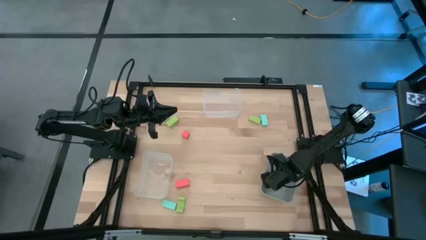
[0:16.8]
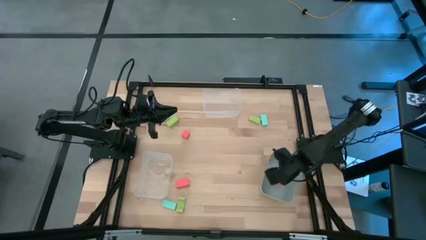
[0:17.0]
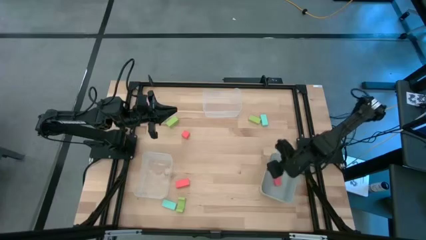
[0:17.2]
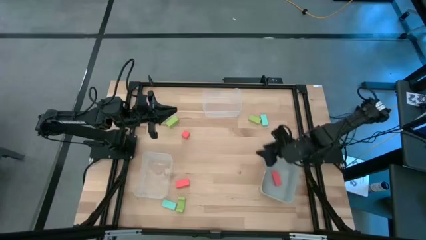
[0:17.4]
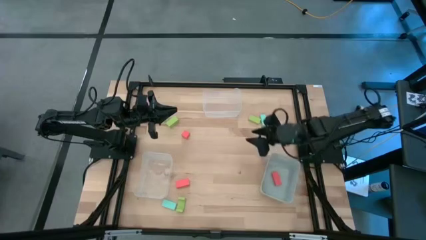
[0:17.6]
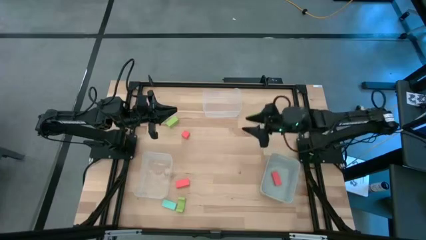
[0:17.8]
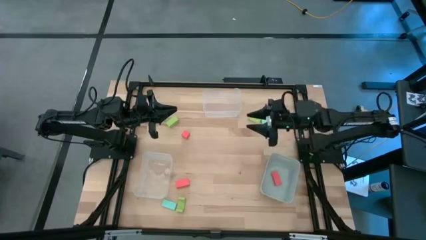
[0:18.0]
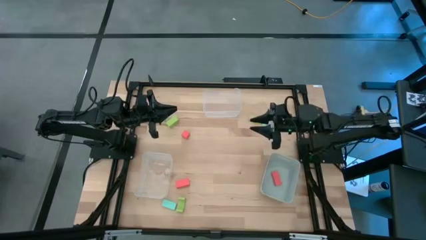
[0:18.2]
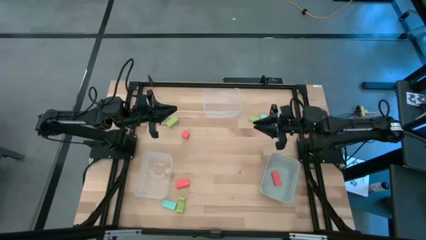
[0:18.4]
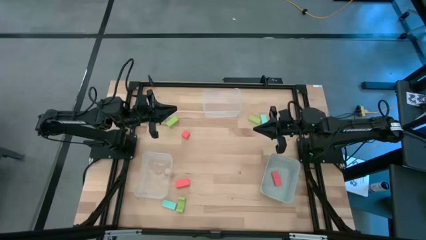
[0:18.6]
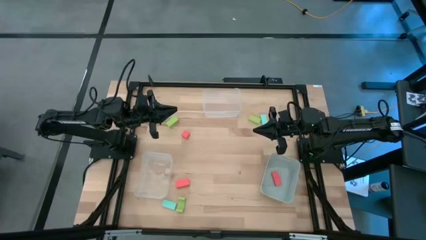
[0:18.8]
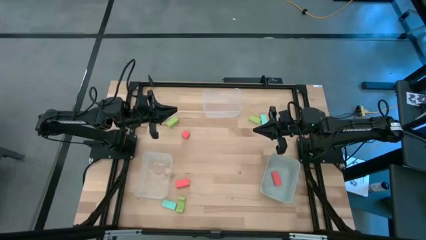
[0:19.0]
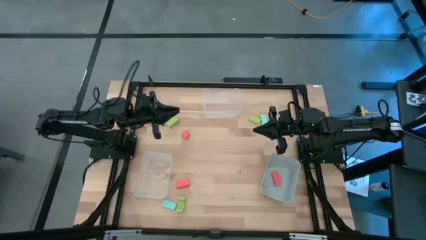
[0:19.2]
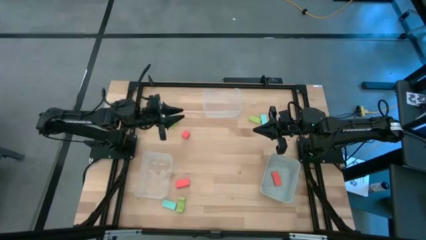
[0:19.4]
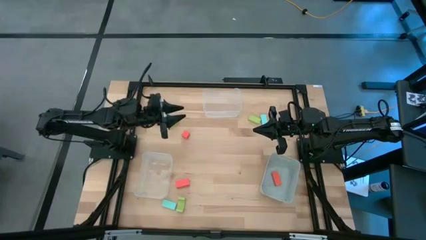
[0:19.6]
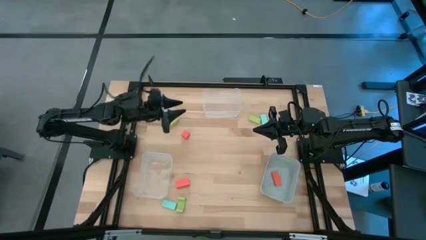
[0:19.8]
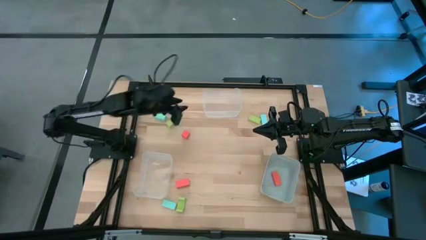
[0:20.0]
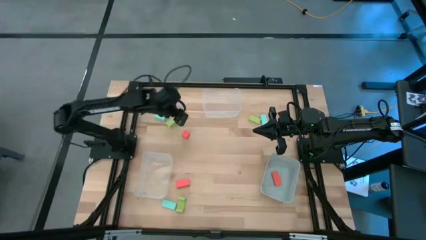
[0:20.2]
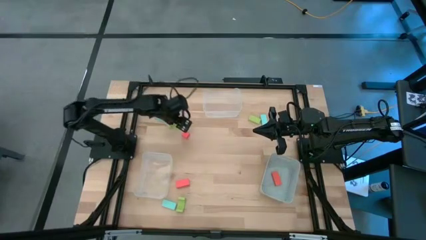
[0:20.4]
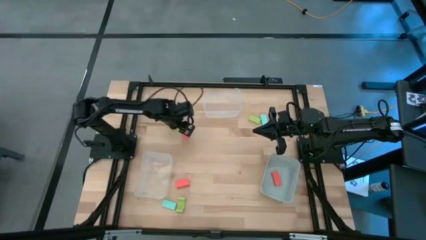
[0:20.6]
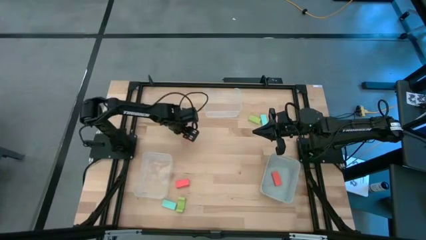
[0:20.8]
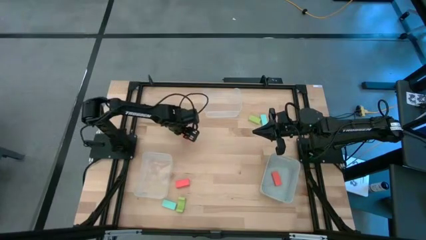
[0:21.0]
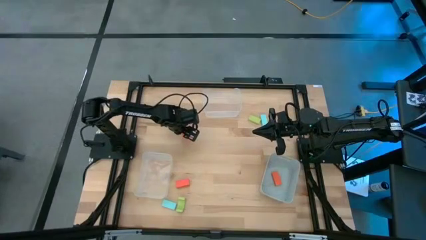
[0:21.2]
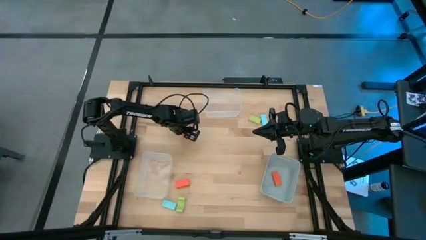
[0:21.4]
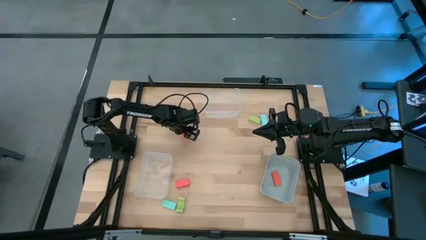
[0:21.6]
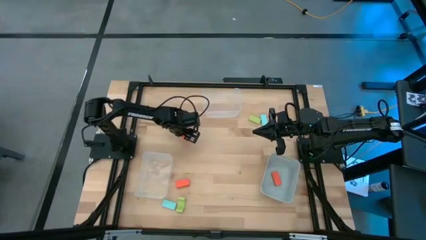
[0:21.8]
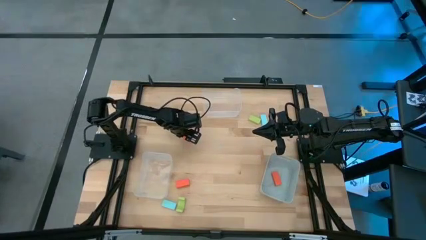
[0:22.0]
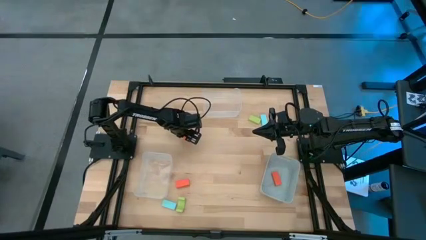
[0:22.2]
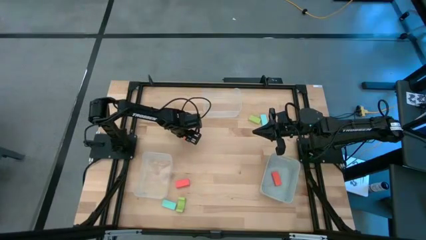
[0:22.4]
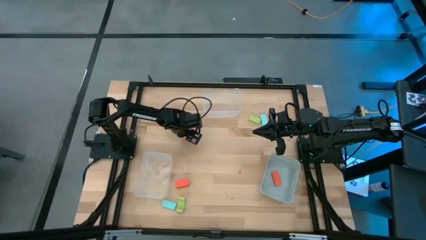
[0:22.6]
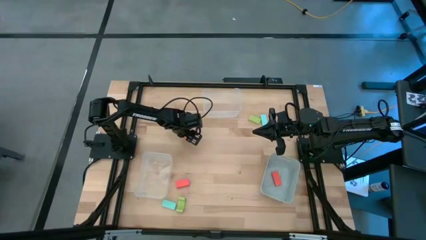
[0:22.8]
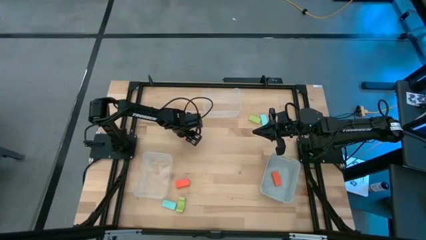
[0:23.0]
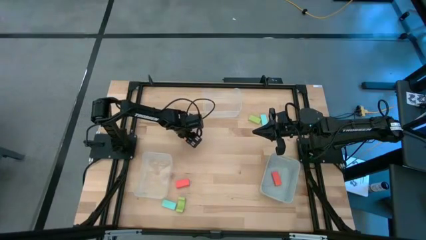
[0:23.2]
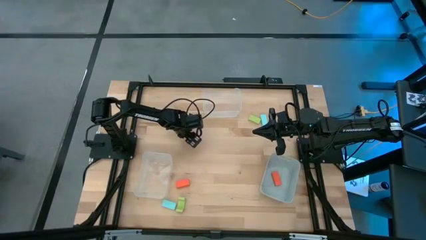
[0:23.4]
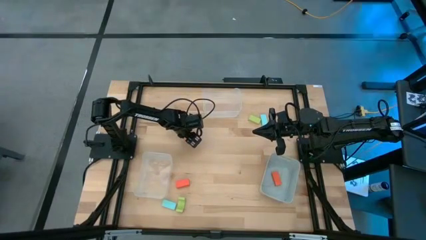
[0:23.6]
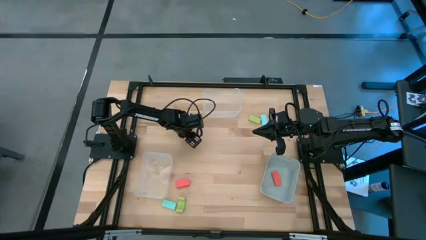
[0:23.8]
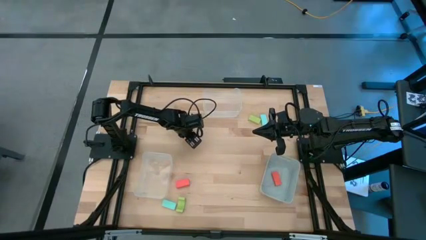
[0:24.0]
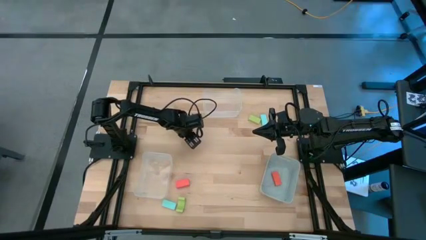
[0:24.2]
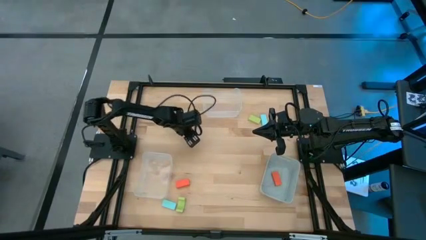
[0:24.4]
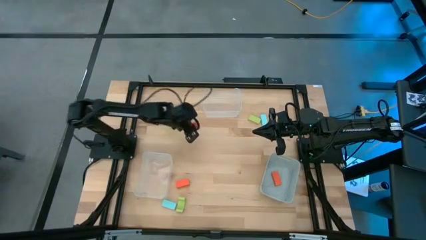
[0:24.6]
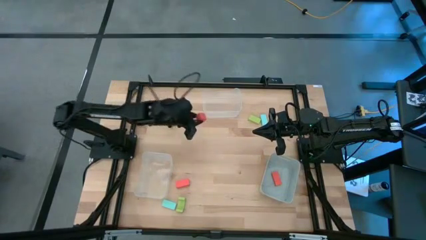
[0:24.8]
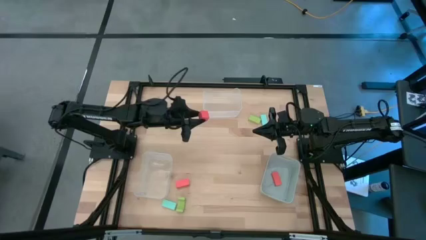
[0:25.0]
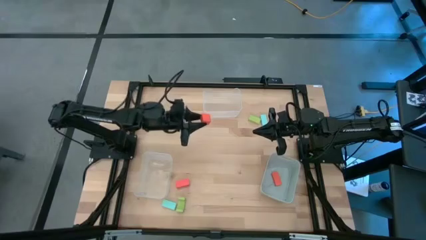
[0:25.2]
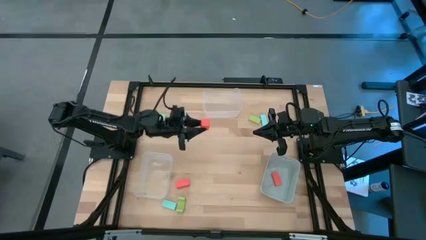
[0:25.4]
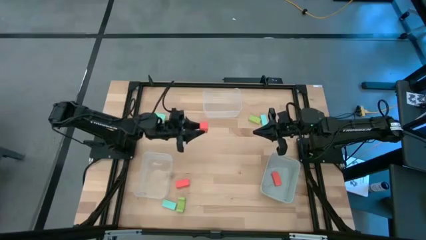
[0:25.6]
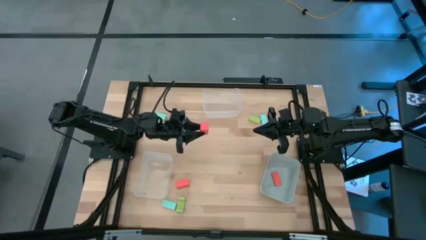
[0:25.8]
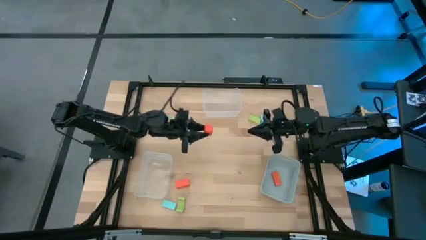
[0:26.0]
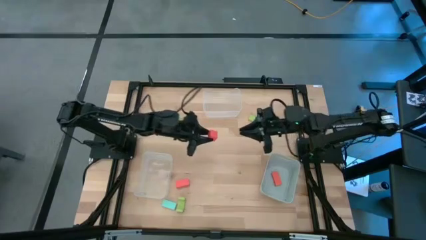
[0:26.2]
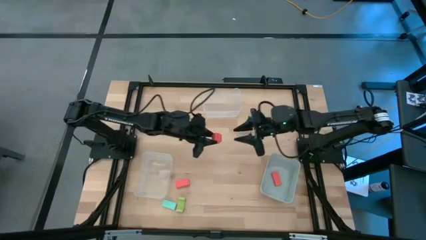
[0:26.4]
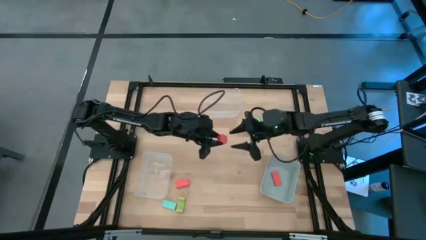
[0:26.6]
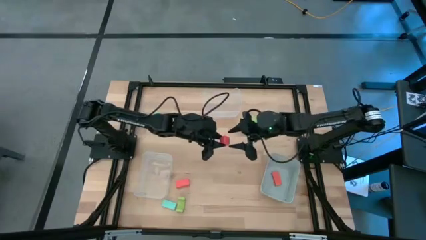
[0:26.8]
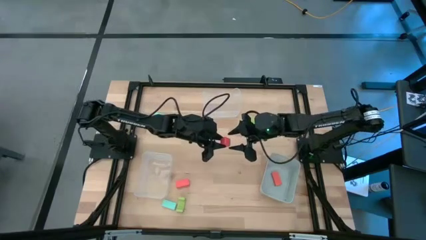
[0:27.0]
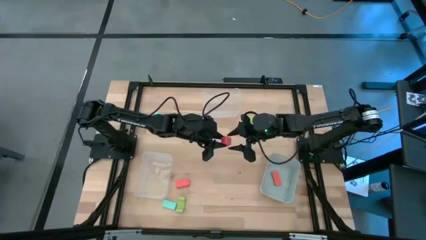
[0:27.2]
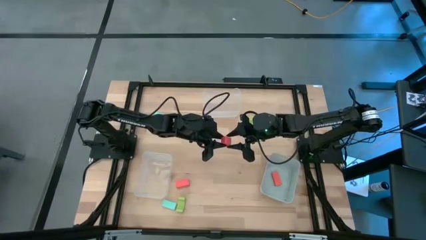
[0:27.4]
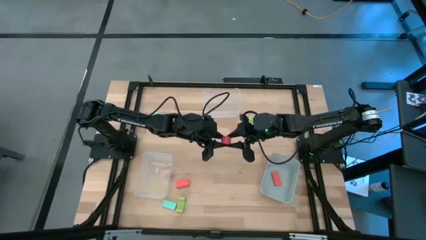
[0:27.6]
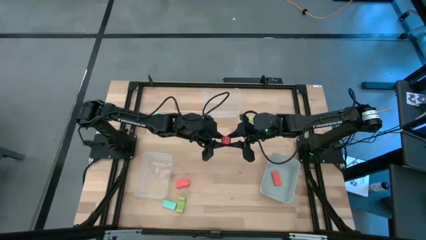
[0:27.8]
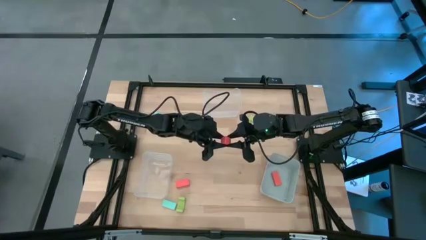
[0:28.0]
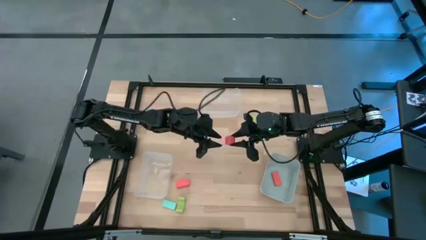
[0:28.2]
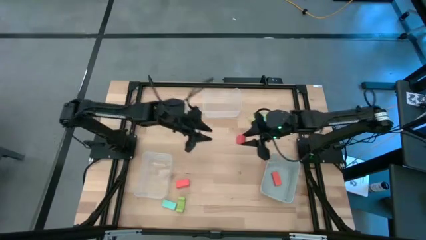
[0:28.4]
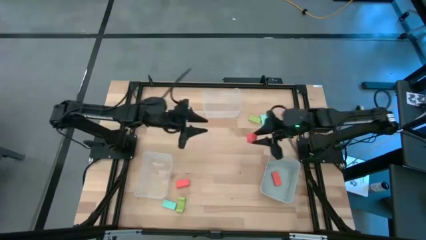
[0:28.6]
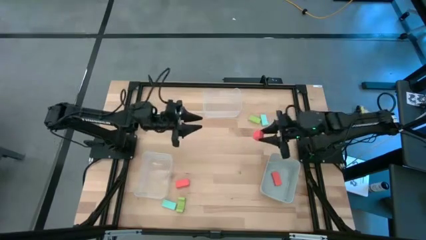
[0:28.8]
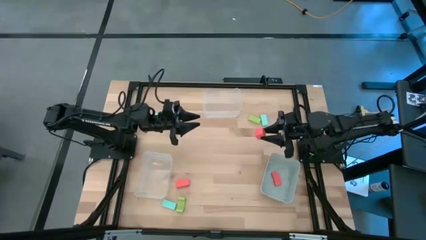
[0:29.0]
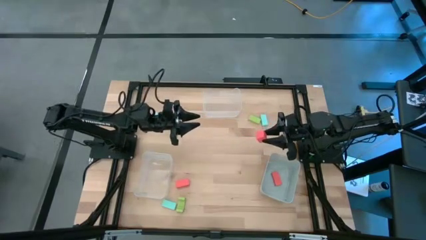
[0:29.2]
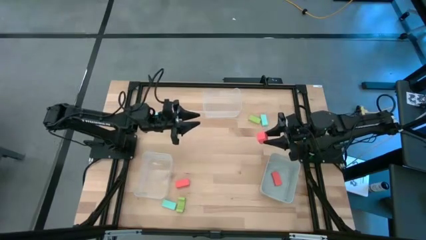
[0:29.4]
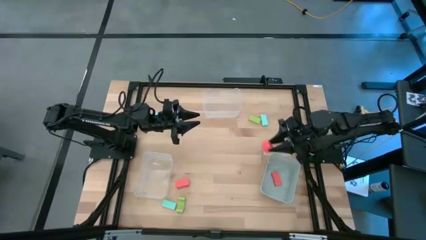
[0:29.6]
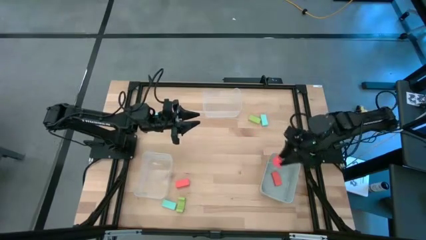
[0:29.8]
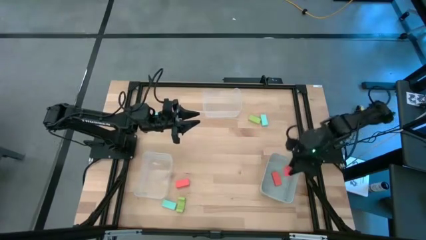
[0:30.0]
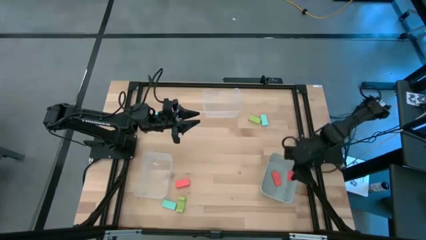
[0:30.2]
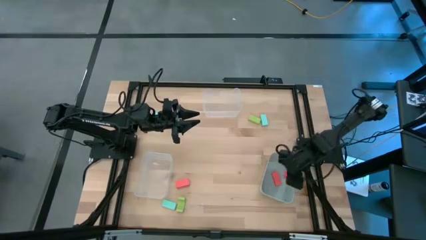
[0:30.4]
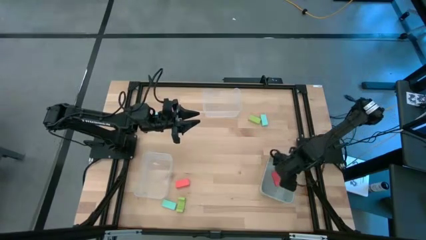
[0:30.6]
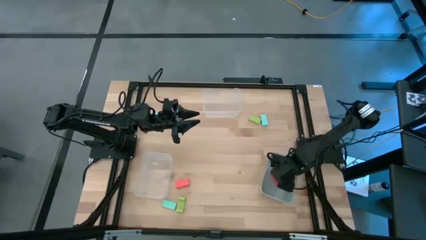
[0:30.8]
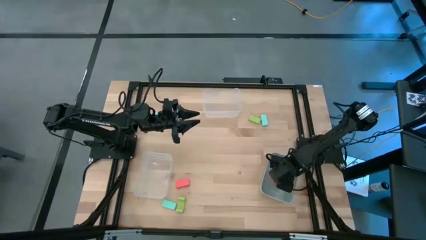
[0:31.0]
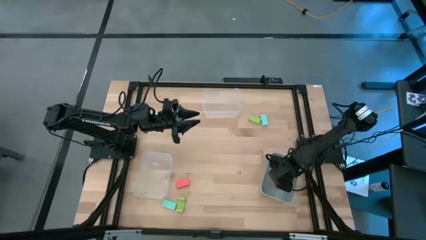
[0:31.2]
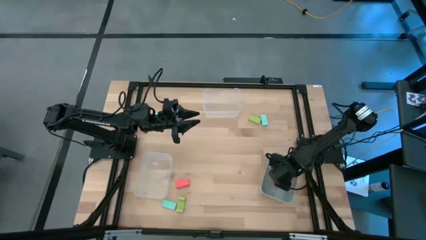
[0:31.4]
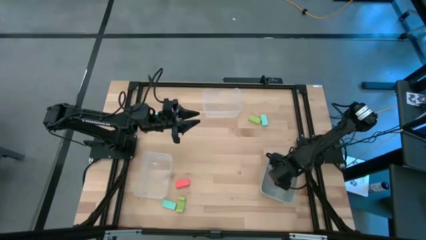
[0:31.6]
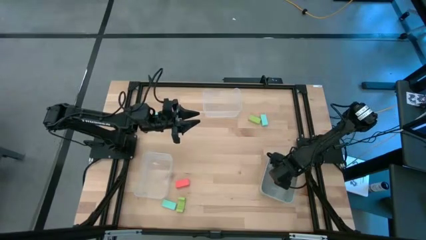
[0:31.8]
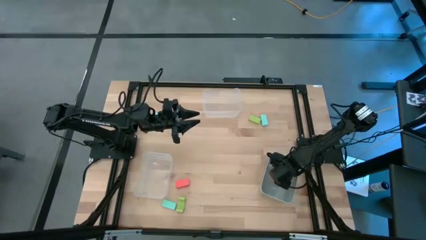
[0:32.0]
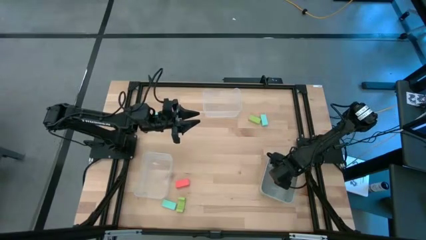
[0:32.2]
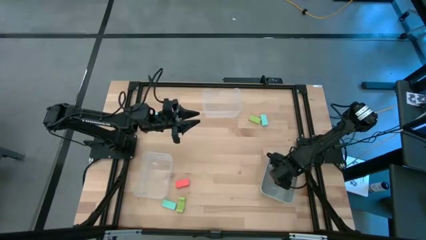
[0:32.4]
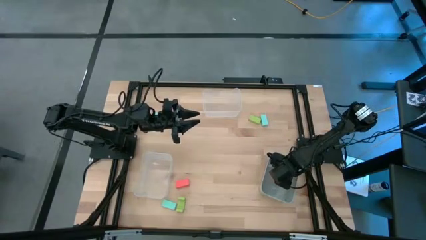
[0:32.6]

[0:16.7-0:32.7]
Task: Sort & place blocks by color
Put the top orange block into the gray bin
